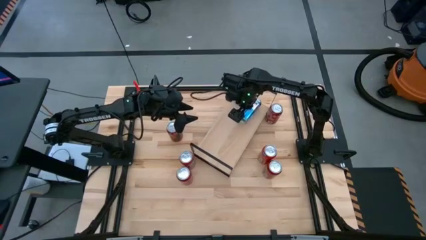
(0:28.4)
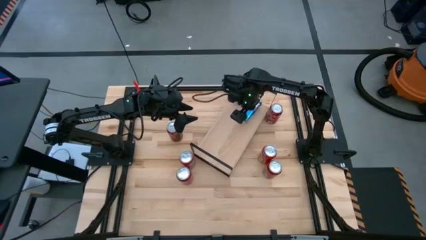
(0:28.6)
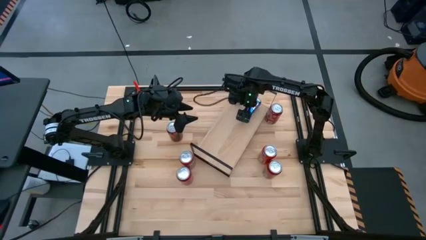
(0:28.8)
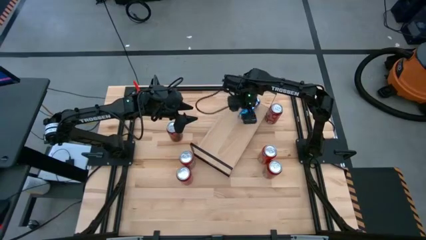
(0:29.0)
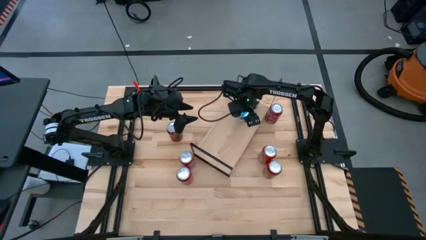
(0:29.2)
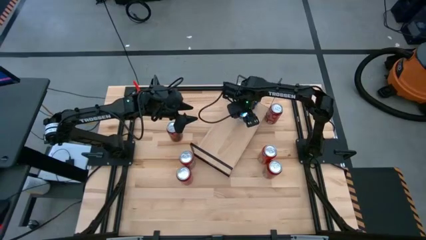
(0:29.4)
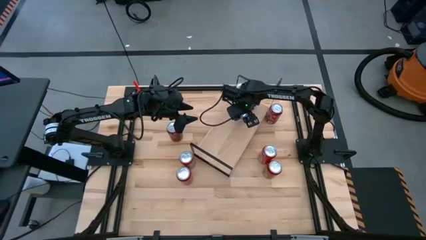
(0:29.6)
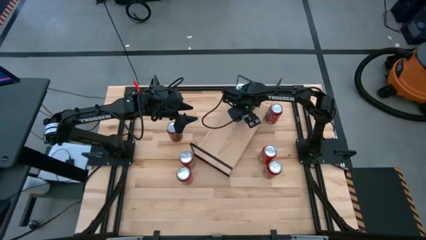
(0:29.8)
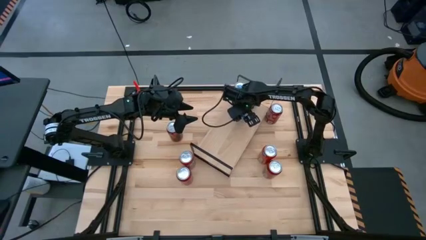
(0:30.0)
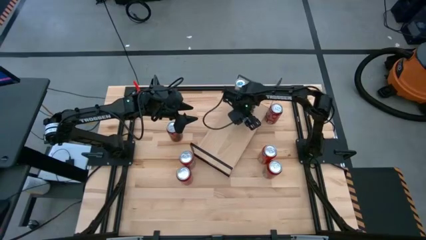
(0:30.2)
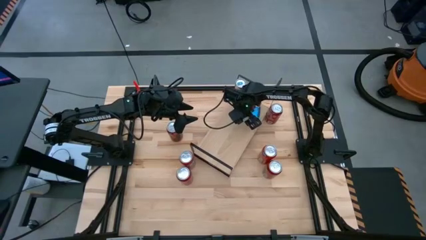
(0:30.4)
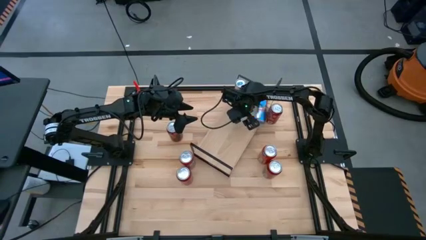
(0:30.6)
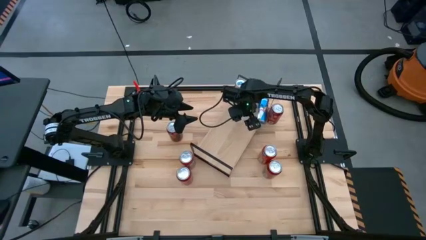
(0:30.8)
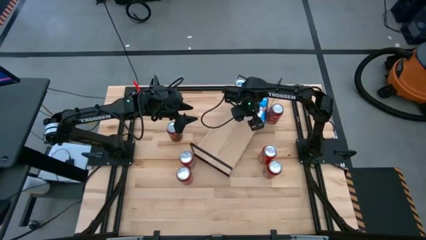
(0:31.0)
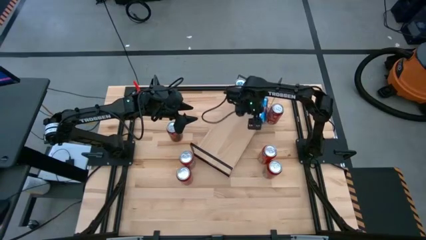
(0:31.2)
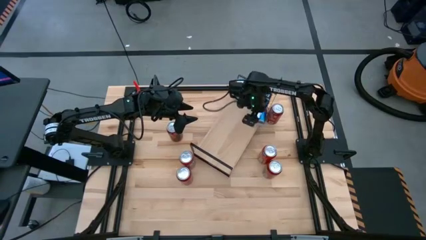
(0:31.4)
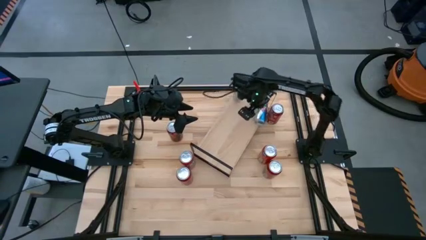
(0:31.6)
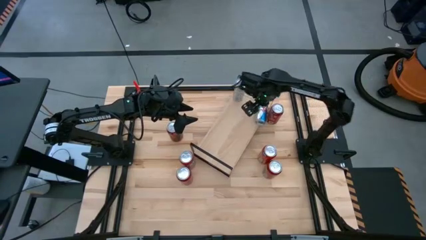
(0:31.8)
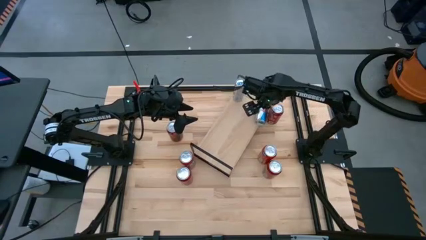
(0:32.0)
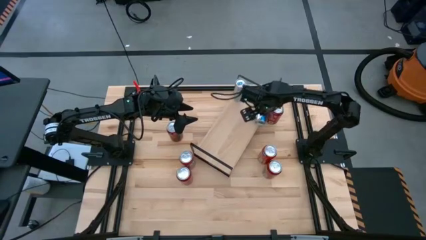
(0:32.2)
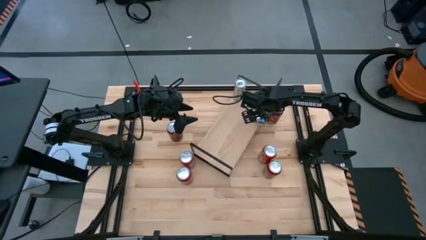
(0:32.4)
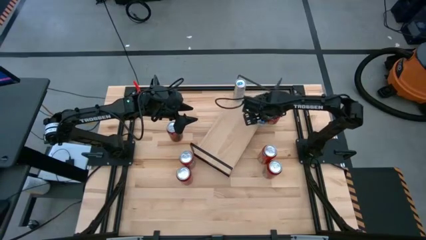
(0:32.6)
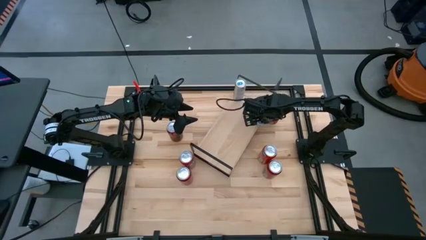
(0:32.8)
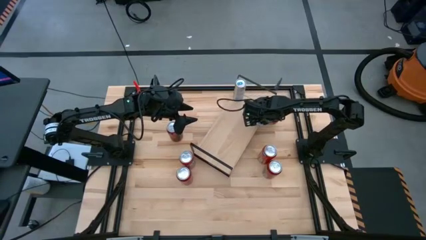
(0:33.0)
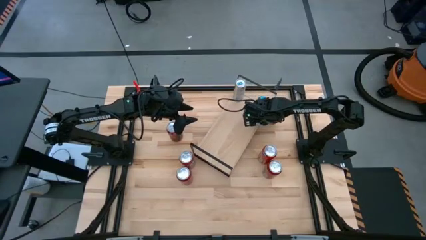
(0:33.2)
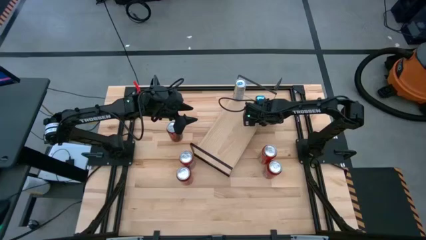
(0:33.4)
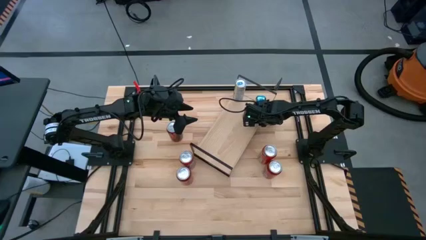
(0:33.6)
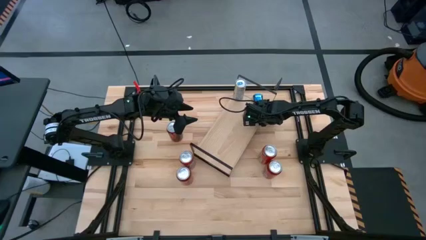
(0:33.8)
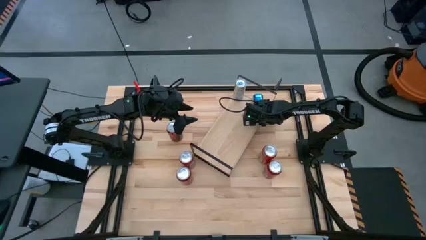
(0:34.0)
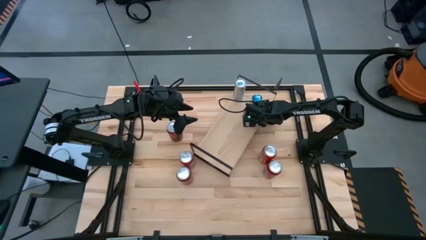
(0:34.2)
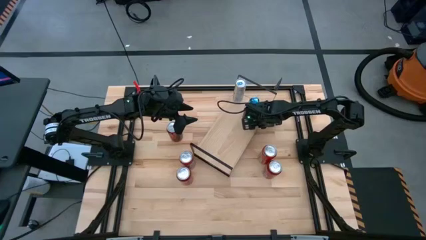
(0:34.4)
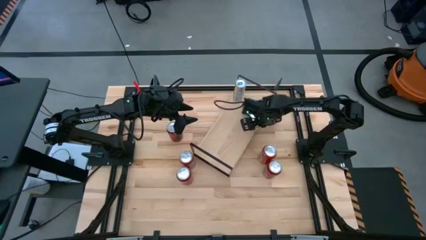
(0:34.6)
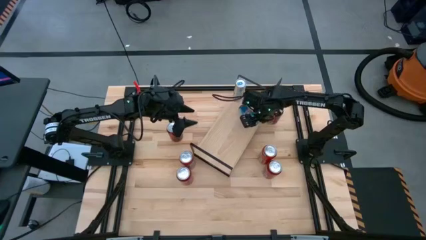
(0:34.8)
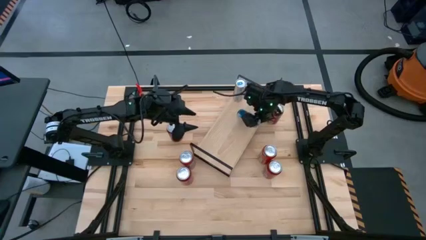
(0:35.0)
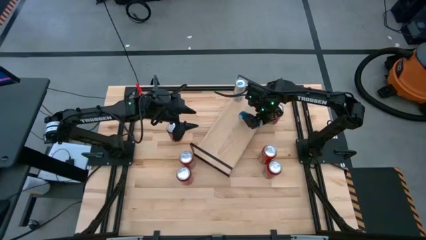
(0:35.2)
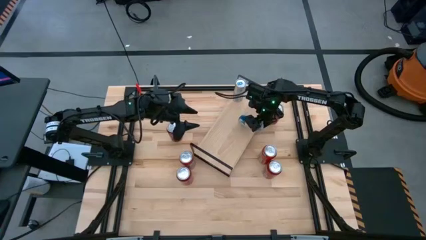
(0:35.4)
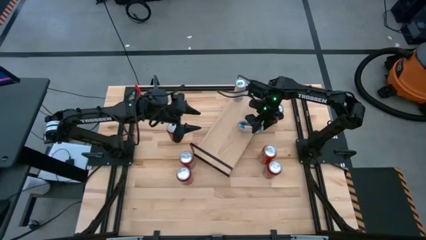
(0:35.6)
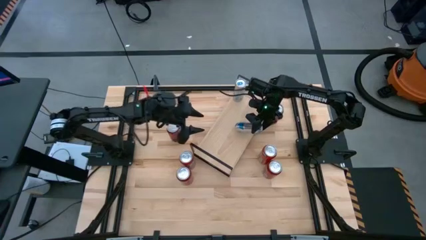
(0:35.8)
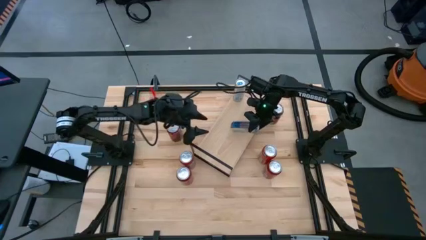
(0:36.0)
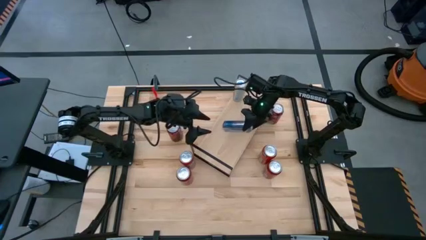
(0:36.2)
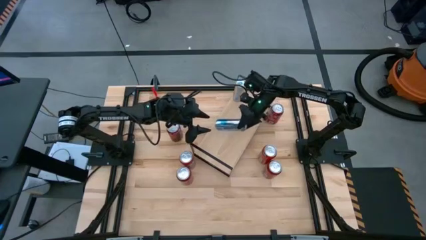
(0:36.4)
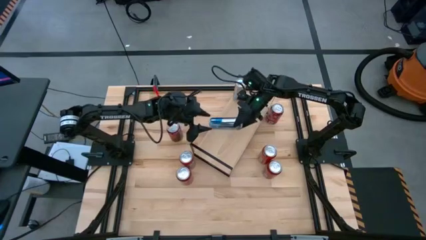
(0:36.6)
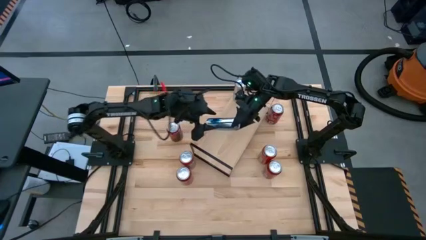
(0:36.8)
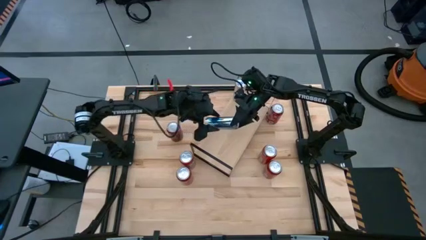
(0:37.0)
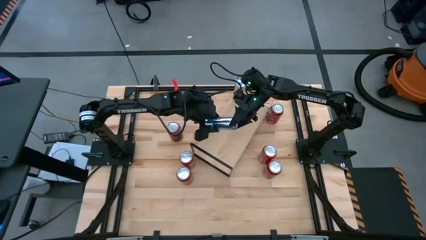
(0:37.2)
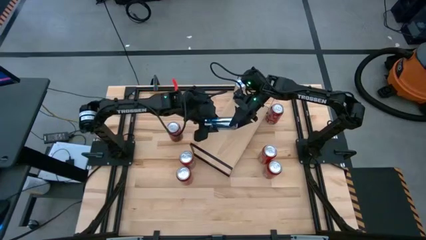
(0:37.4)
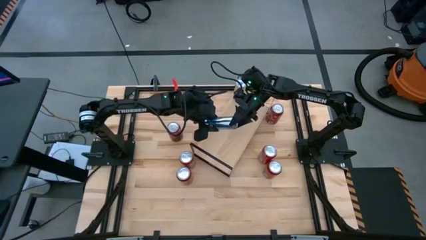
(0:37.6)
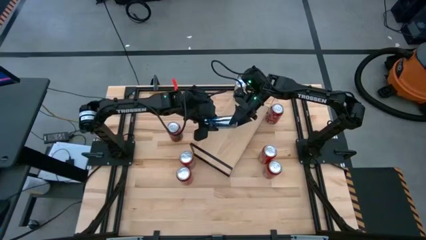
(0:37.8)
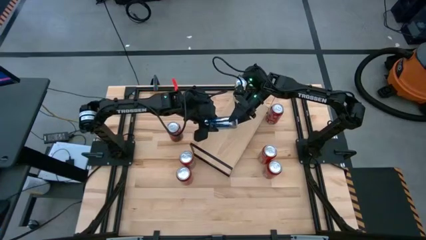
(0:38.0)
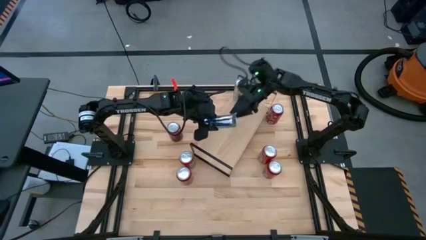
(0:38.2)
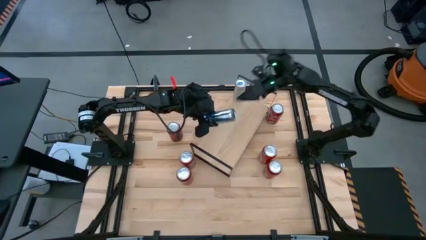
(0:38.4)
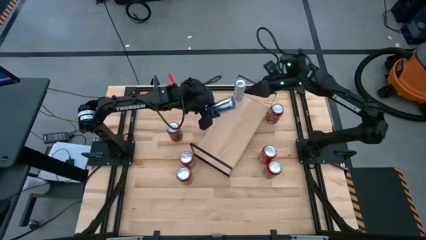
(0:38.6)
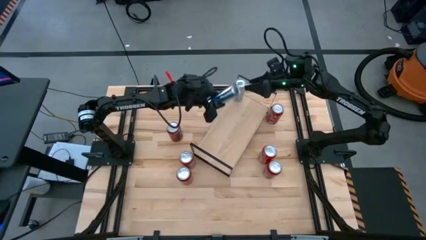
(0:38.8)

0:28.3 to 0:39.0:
Task: Place canned beverage on shelf
Put the blue soda can on the shelf aligned with the other blue soda can

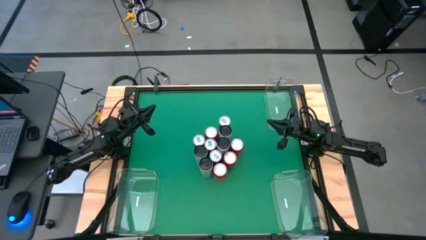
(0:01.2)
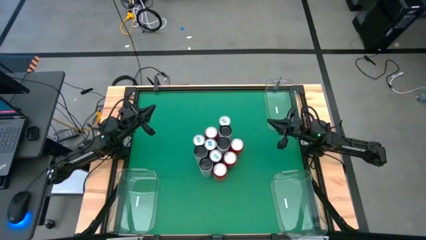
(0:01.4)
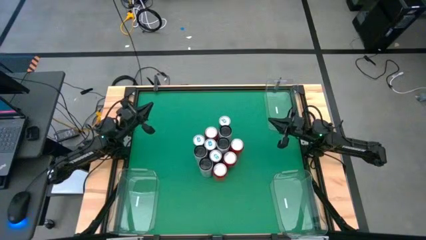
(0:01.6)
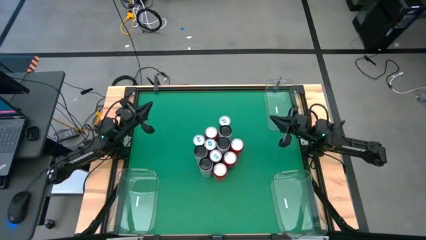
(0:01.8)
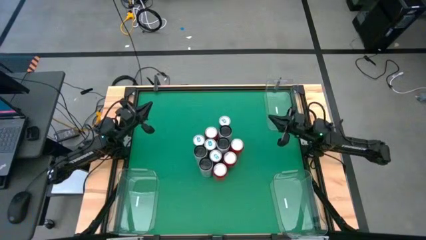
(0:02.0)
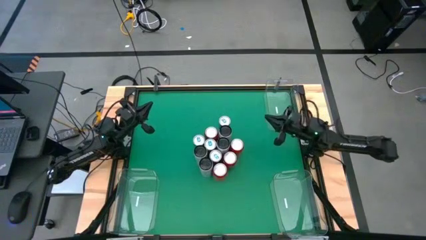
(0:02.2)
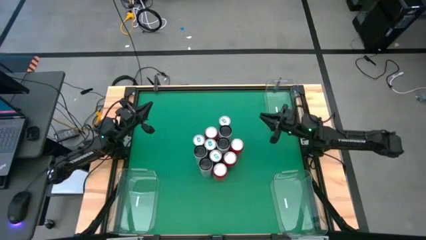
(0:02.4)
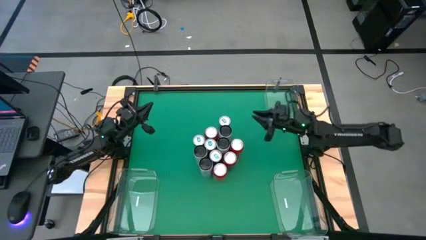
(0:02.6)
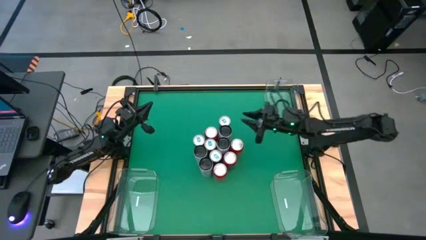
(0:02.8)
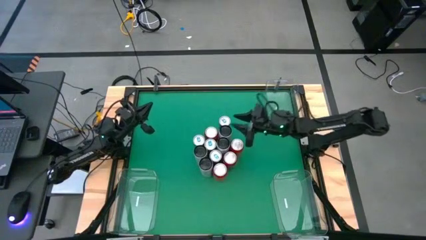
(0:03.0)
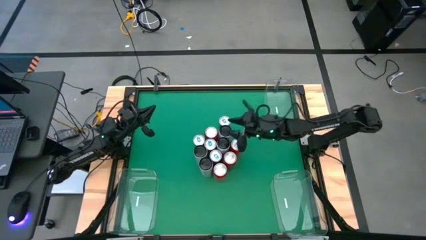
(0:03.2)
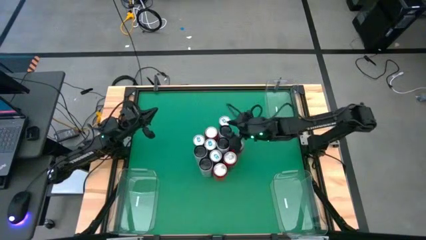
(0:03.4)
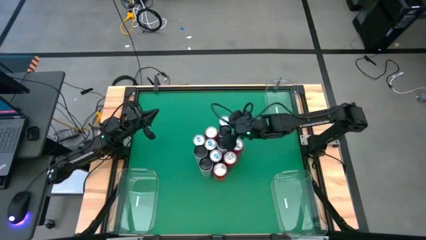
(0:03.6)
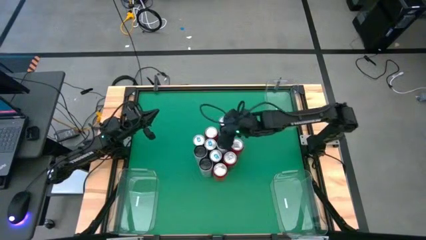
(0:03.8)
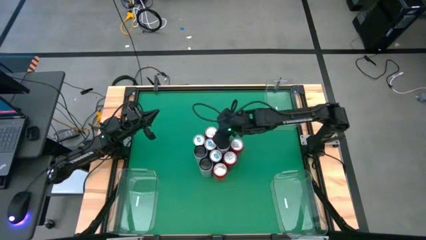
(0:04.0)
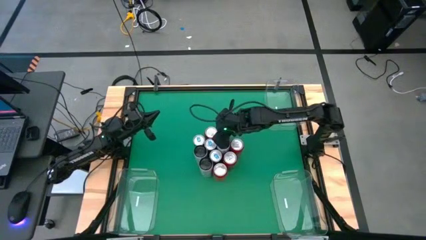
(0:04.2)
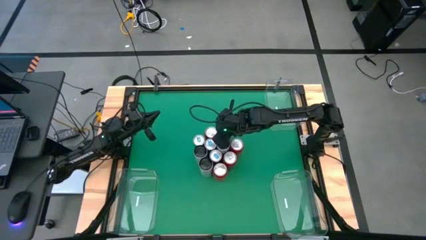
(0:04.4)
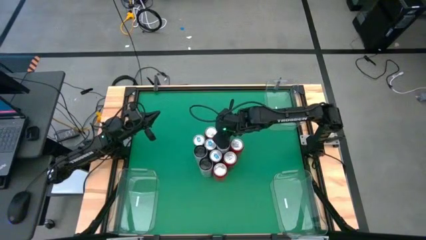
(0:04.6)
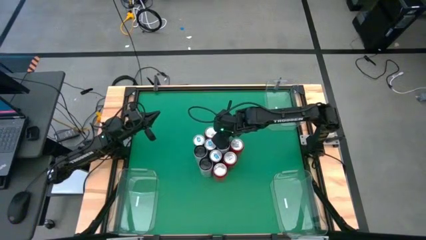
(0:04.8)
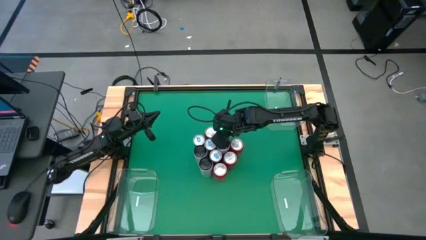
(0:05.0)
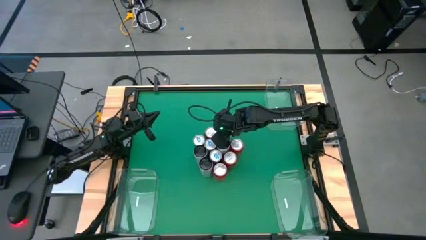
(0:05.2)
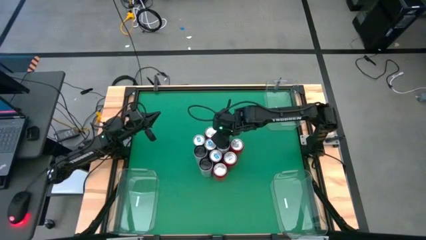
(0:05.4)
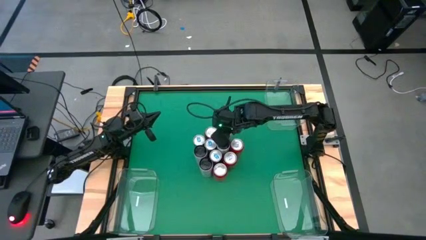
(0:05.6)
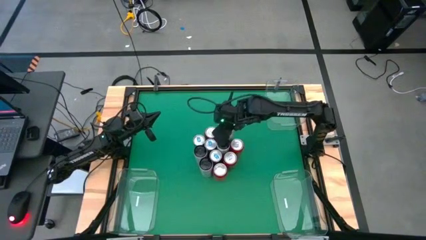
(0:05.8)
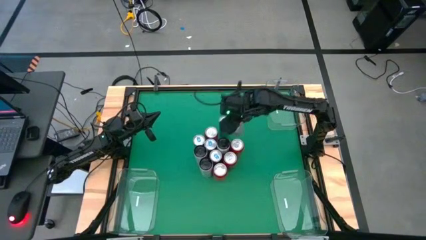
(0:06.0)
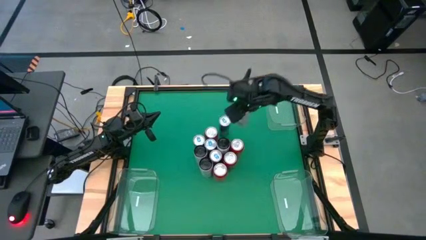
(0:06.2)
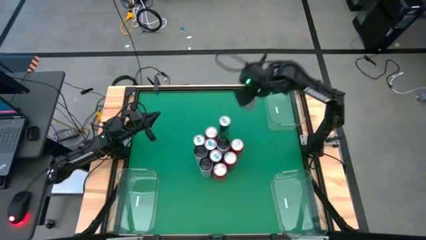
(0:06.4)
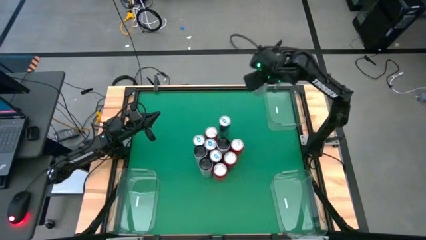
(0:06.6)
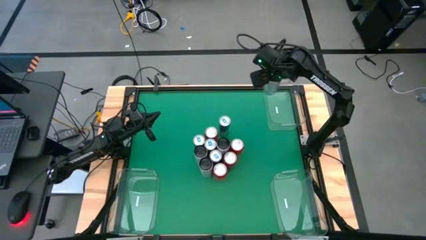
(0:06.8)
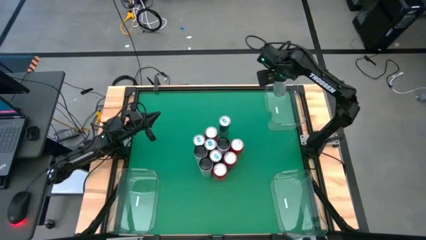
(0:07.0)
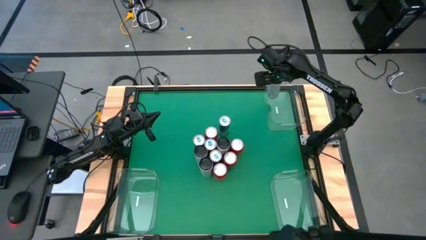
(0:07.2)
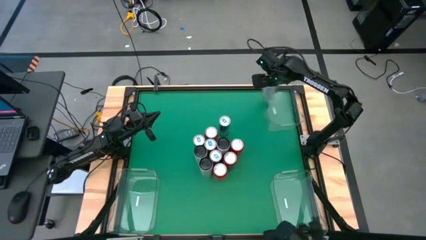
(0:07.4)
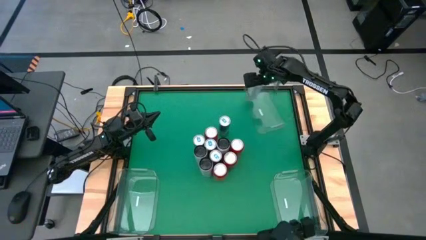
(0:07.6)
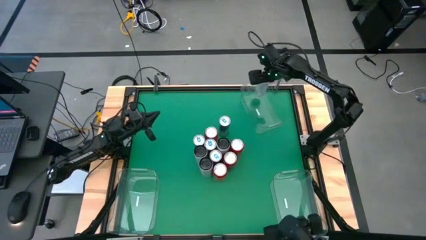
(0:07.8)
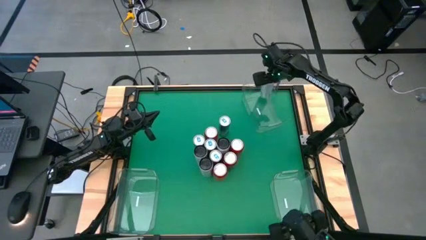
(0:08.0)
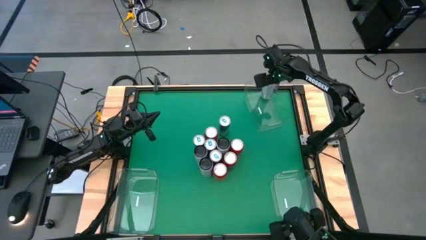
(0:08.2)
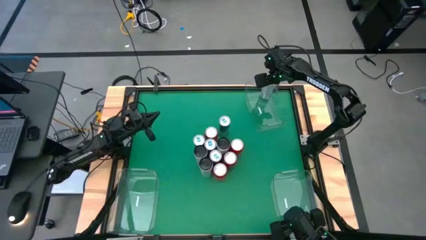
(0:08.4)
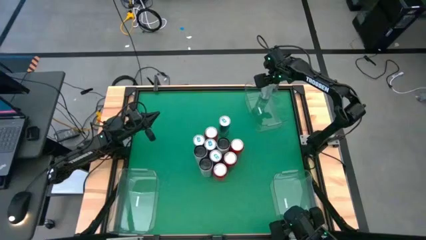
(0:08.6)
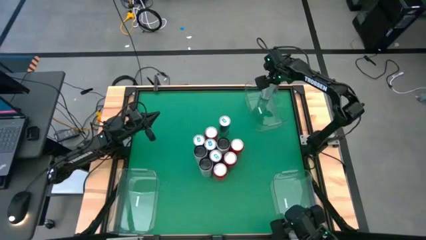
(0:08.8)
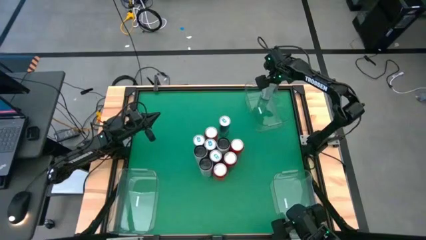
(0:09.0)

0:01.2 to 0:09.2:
Task: Sort soda cans
Put the white and yellow soda can into the top transparent bin
